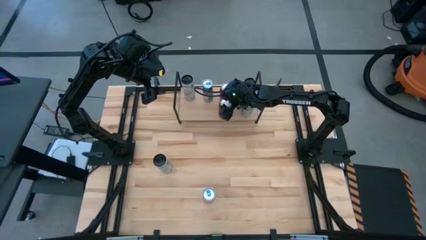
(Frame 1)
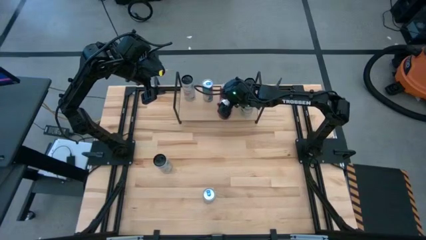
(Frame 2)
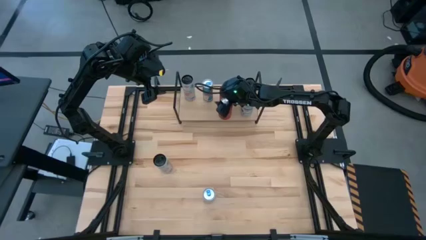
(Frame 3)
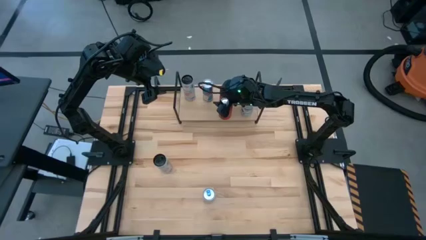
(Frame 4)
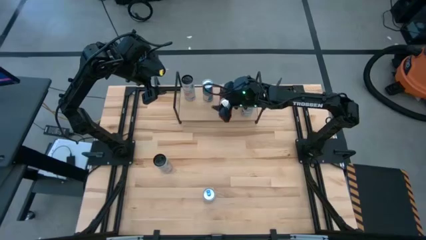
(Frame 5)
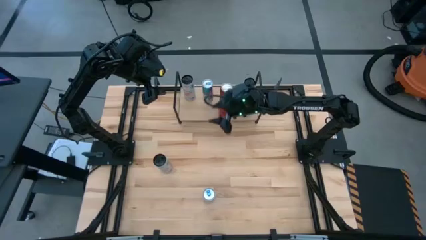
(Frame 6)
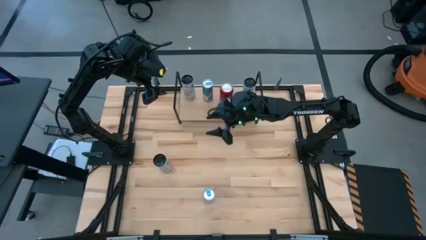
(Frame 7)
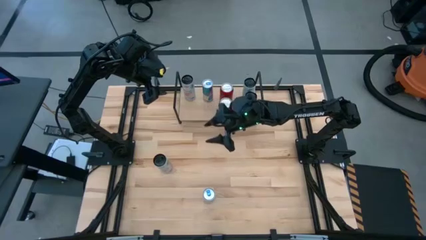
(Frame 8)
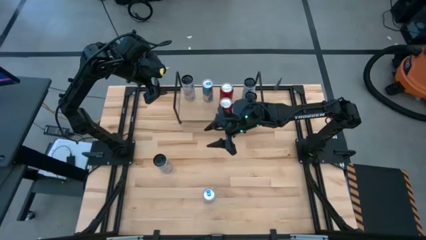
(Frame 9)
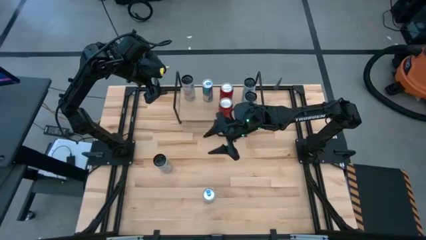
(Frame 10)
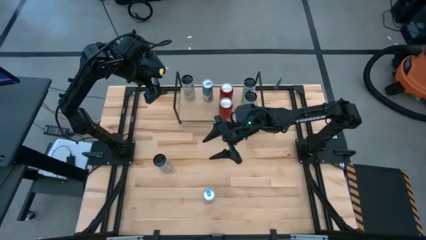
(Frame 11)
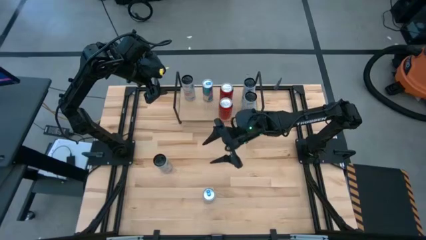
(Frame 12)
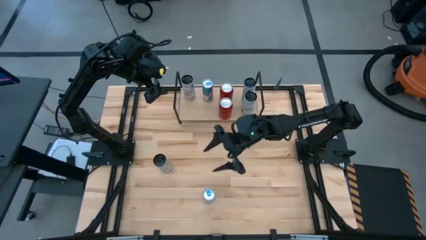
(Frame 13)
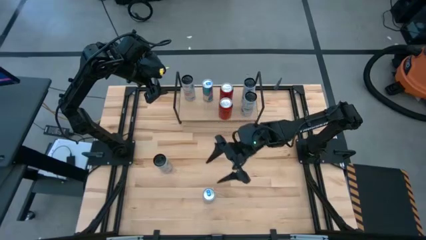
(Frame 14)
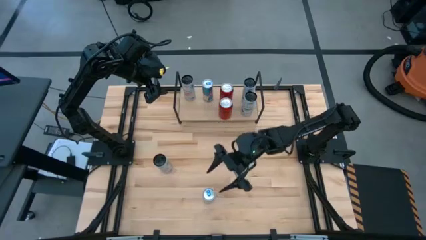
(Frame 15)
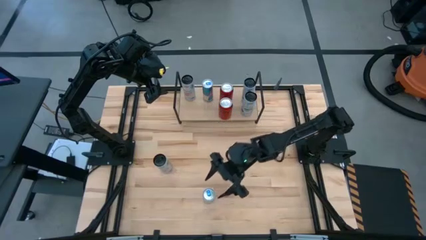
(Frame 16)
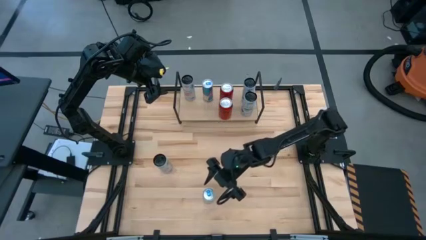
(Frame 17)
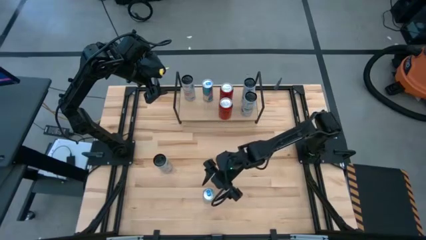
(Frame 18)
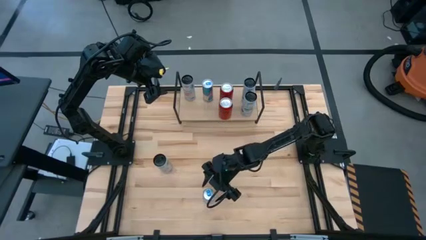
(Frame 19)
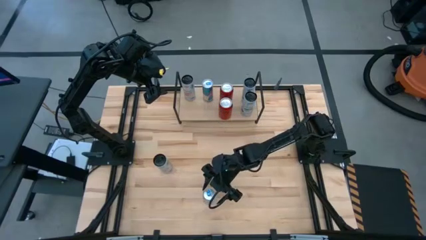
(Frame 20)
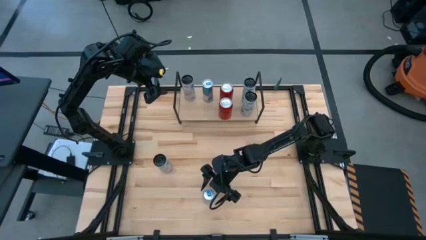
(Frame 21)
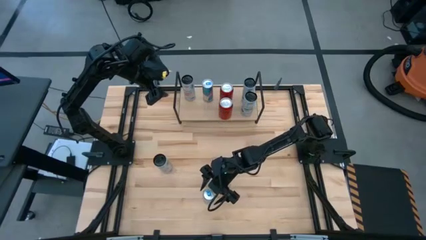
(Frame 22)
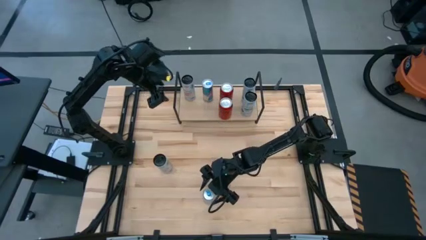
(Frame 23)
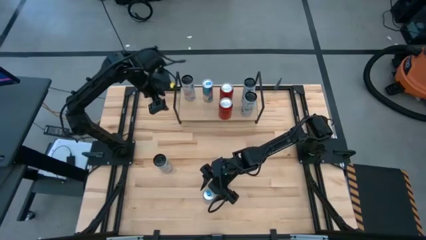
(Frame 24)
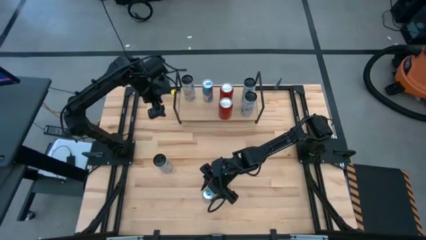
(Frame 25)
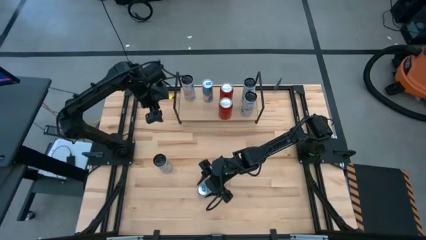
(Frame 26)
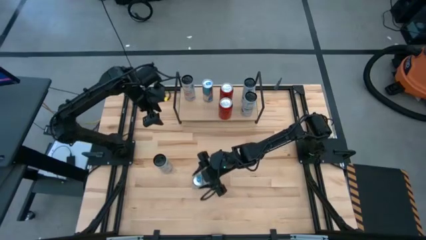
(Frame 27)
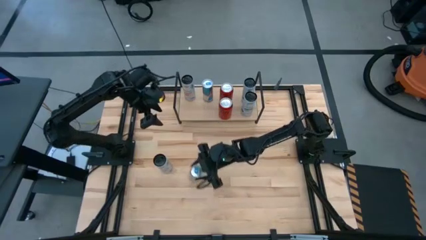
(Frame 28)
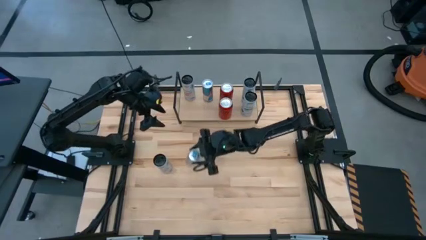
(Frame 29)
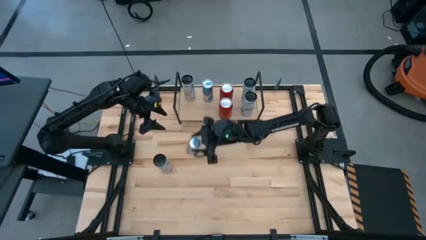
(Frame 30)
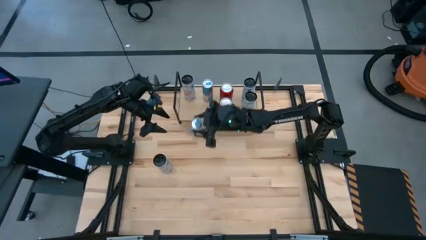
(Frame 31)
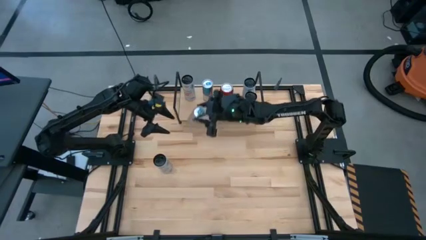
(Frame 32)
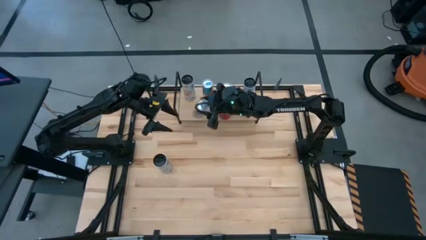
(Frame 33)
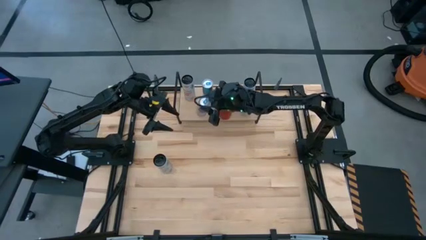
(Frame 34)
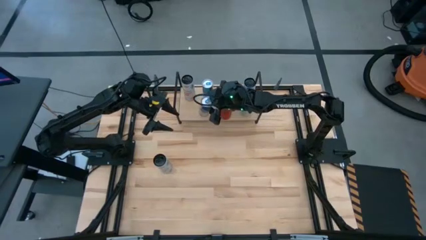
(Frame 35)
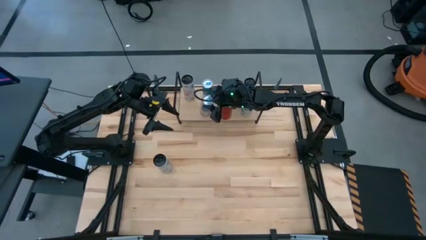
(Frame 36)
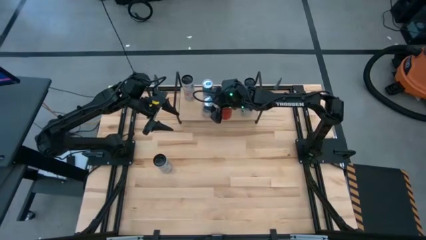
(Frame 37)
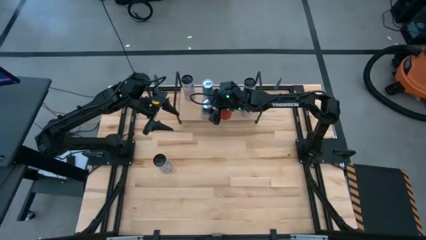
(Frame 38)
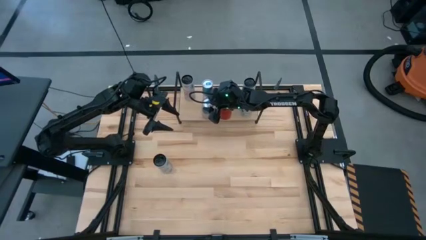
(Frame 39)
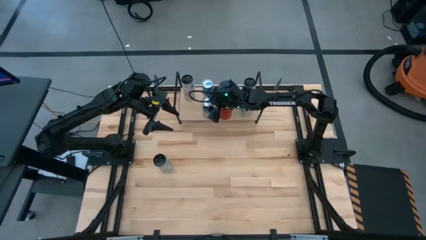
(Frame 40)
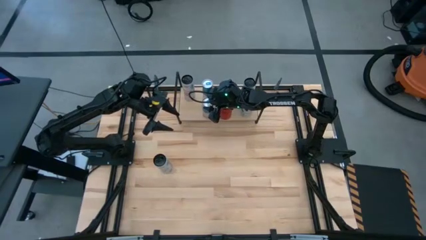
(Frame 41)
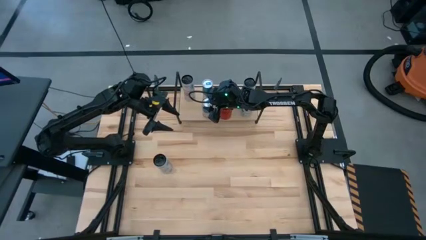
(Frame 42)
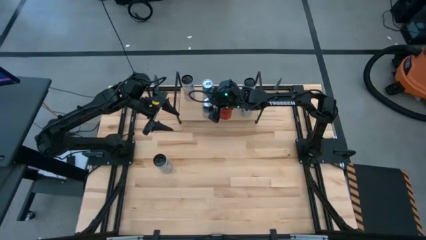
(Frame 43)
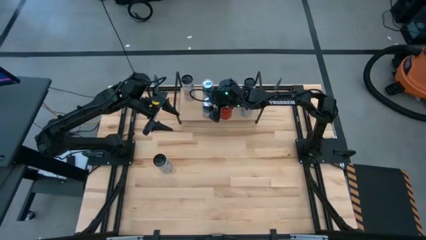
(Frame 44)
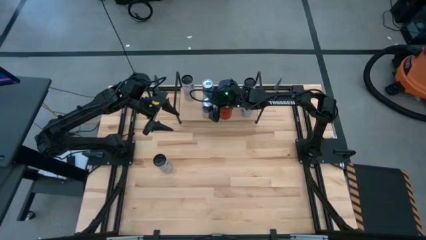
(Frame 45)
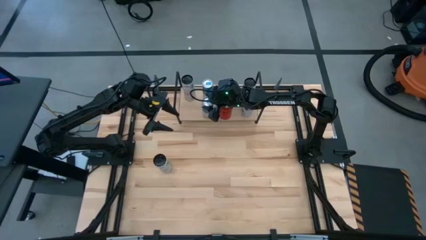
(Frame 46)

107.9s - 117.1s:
Task: Place canned beverage on shelf
Align the blue soda can with the blue soda can on the shelf

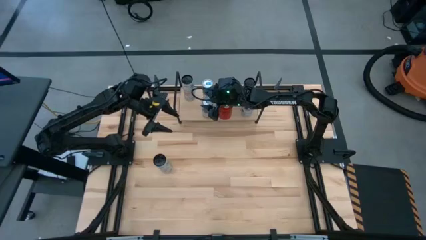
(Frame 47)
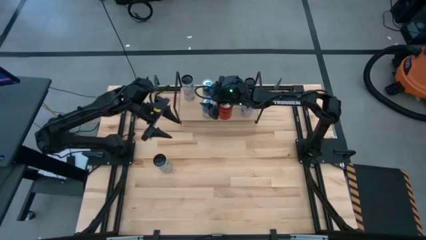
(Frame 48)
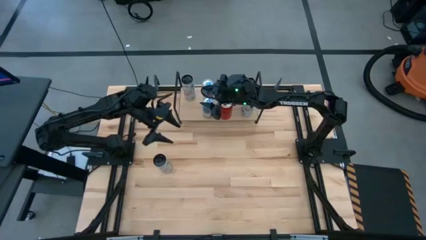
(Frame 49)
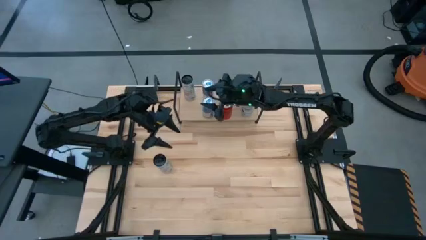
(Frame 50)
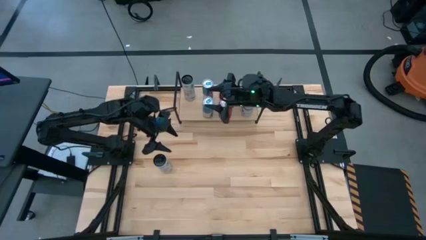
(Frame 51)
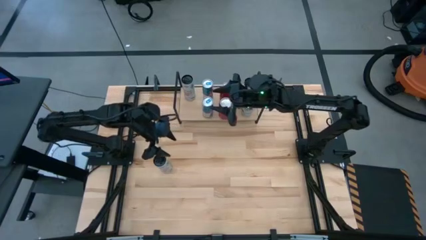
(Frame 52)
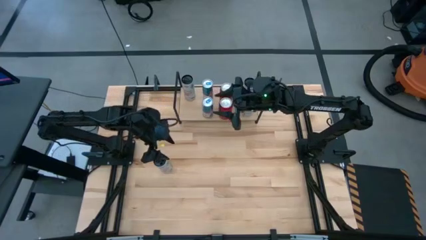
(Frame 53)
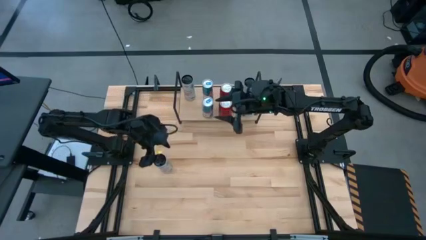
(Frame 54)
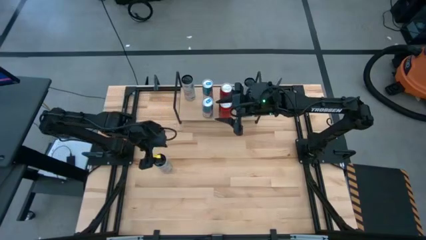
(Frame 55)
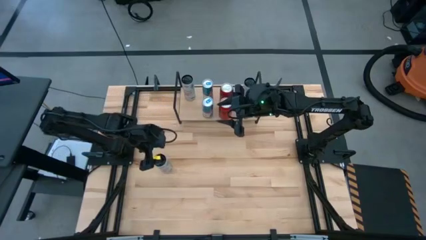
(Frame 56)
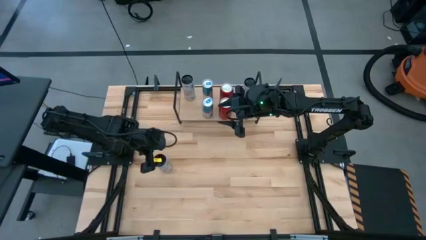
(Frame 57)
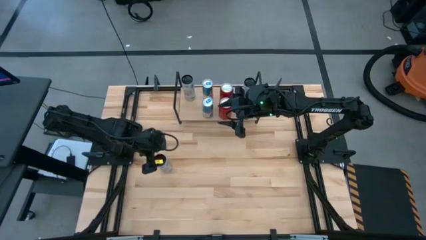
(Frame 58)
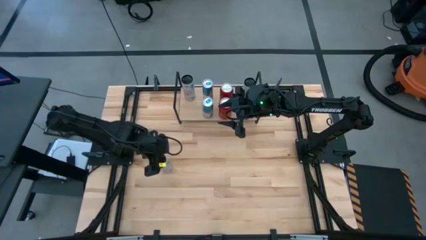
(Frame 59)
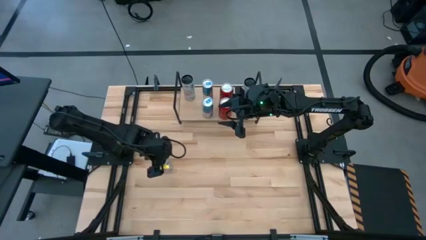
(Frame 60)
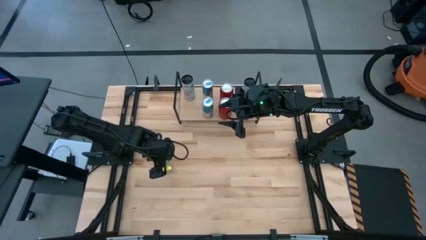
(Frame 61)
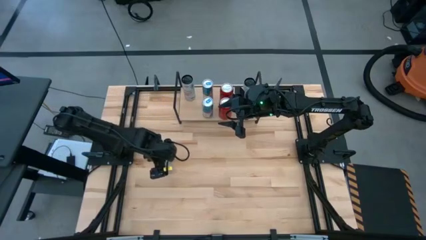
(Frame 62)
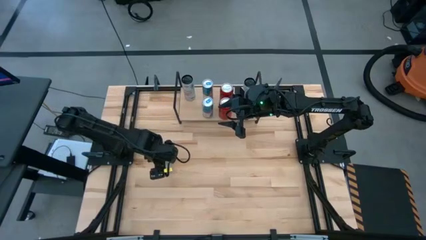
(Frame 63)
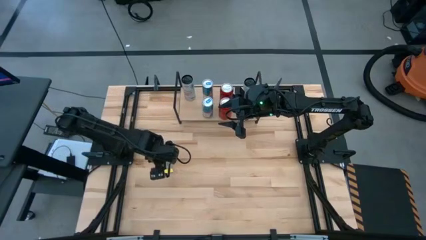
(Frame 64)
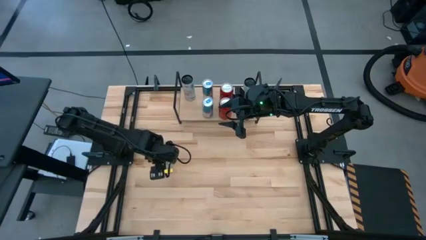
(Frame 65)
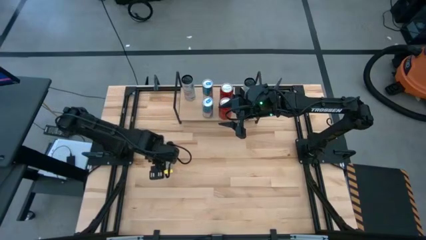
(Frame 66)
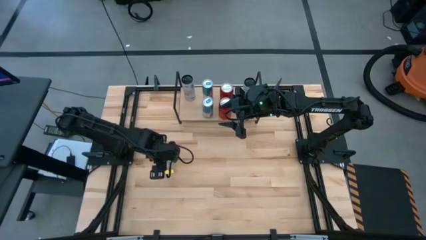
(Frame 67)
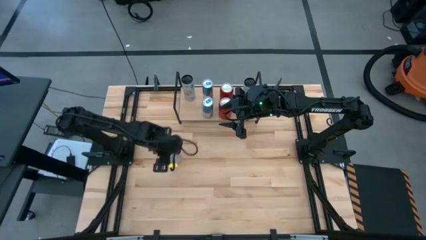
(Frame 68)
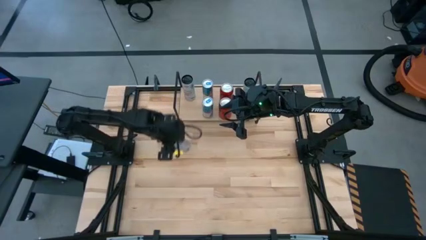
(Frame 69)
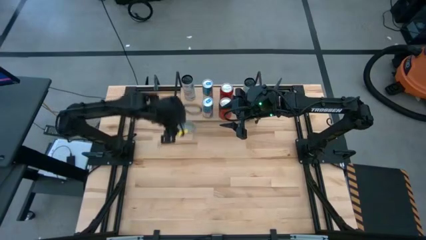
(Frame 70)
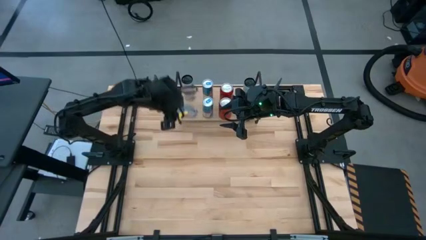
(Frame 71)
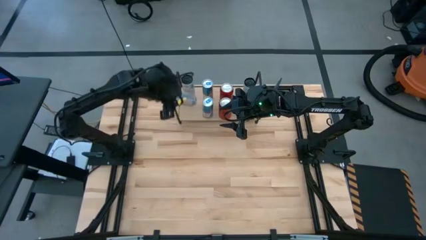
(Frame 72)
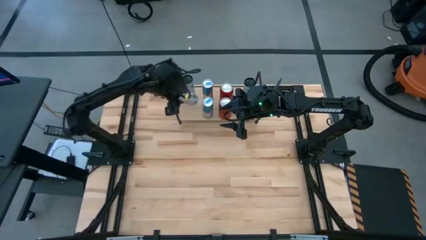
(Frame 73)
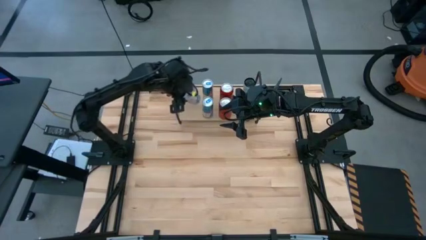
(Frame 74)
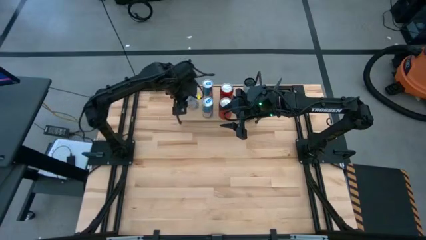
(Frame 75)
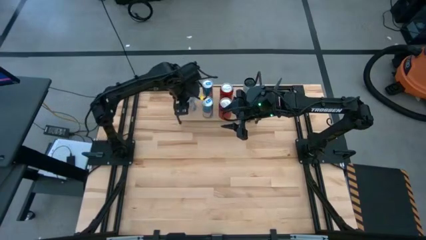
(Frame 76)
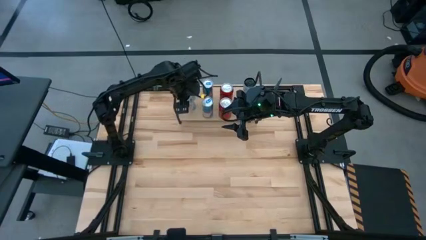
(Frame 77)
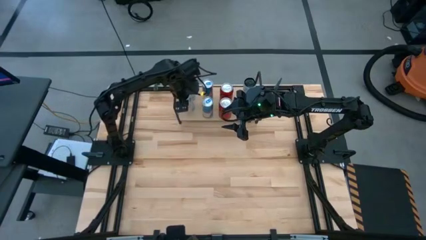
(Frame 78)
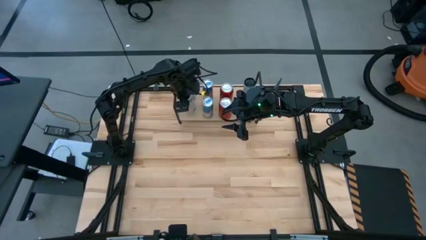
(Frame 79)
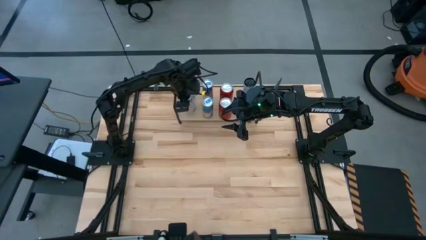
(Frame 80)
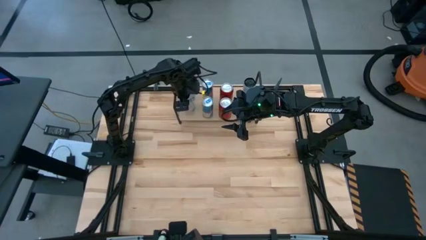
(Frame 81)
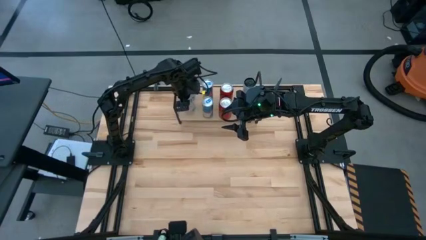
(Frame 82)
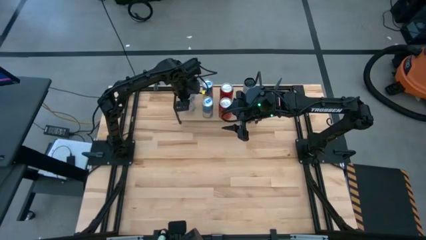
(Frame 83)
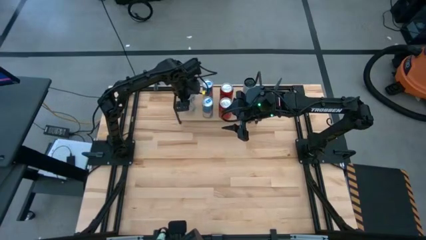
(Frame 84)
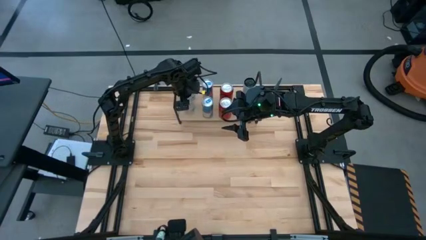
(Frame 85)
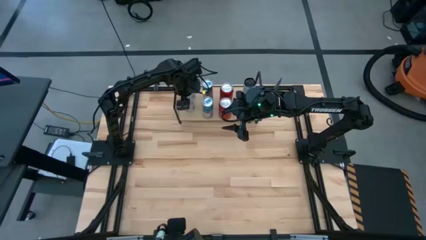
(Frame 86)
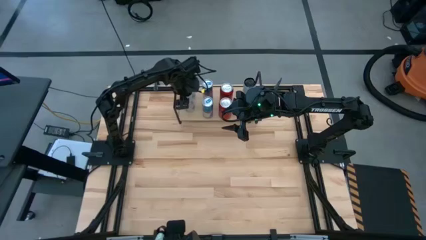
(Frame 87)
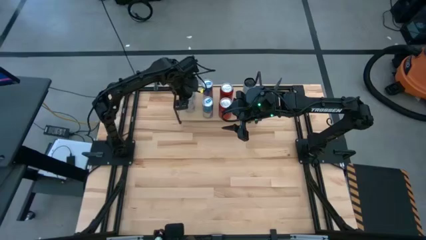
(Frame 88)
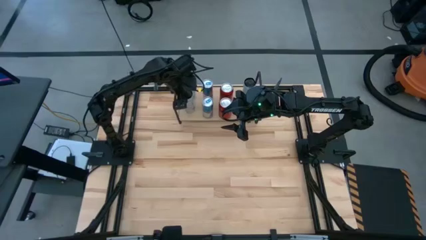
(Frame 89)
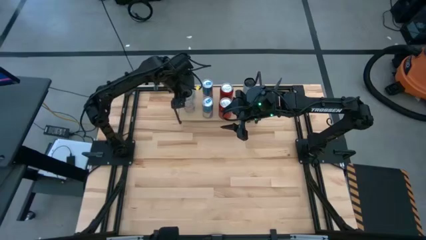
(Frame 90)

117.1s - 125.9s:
Align the white-pink soda with the white-pink soda can on the shelf
